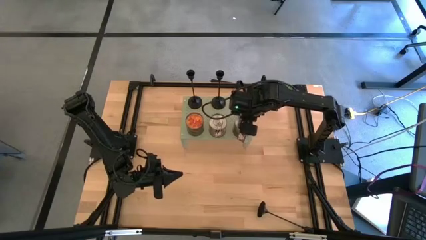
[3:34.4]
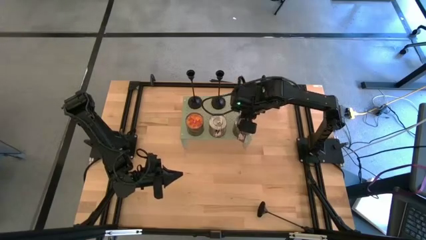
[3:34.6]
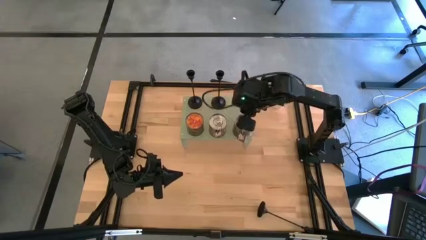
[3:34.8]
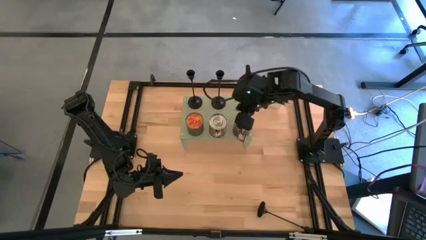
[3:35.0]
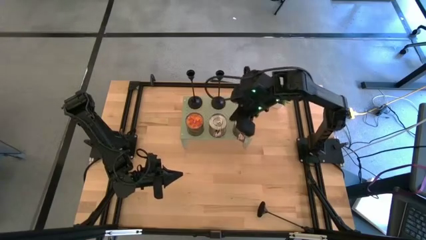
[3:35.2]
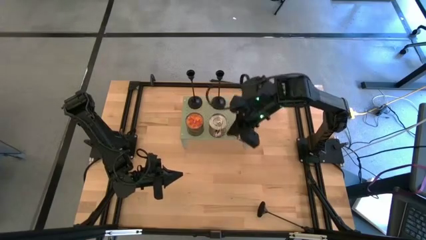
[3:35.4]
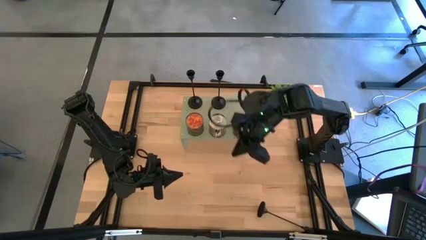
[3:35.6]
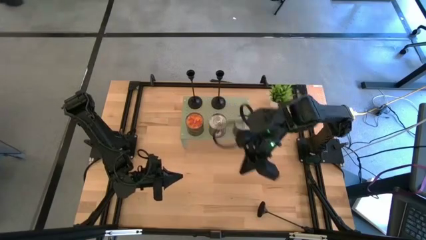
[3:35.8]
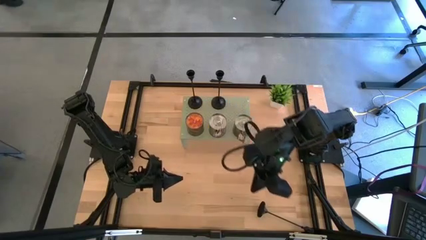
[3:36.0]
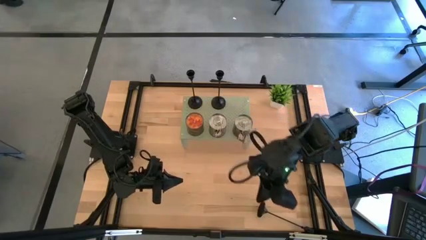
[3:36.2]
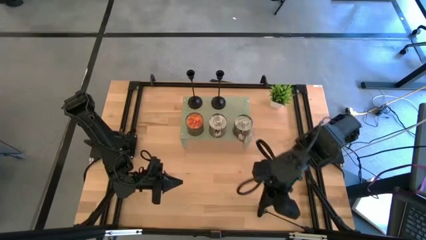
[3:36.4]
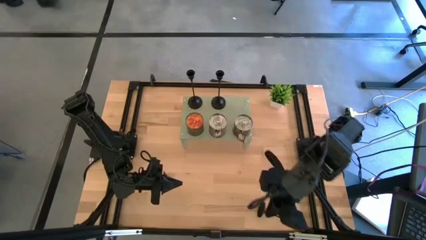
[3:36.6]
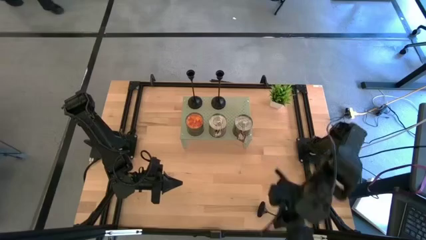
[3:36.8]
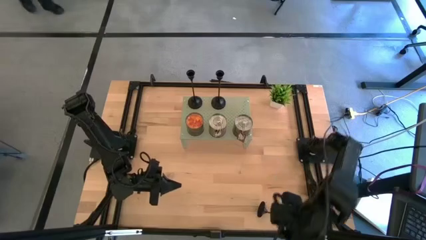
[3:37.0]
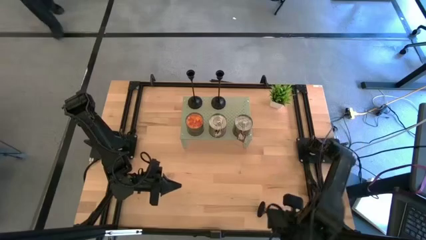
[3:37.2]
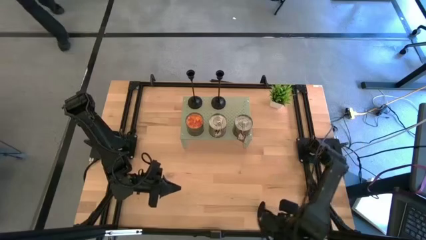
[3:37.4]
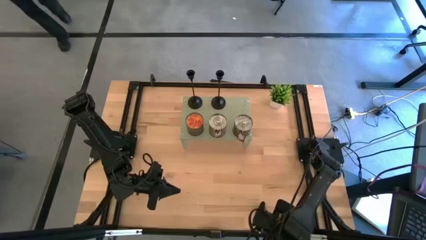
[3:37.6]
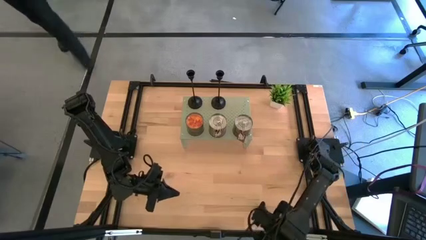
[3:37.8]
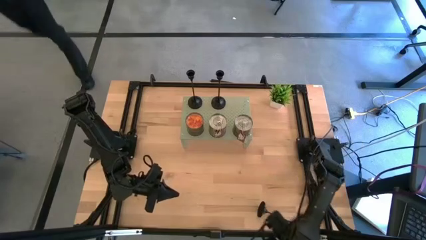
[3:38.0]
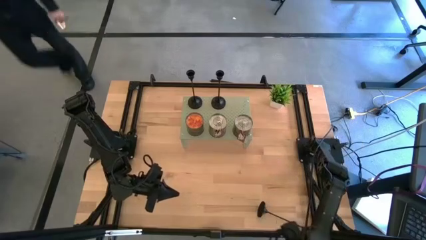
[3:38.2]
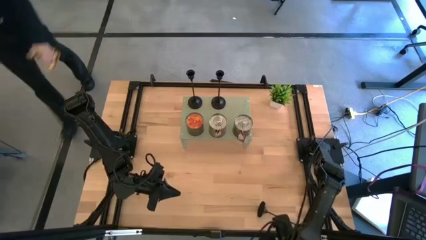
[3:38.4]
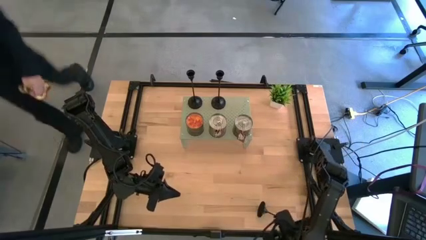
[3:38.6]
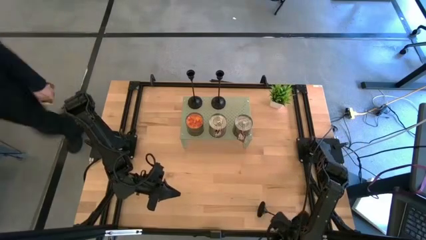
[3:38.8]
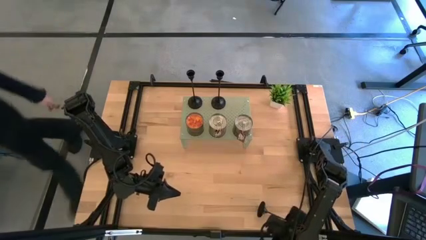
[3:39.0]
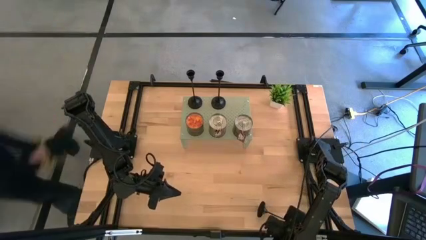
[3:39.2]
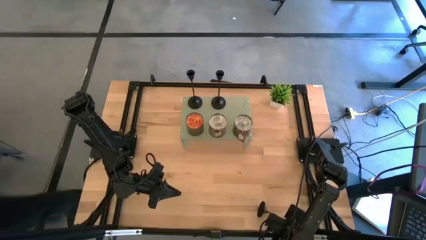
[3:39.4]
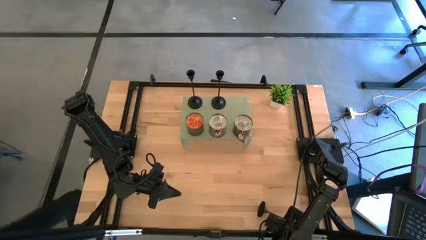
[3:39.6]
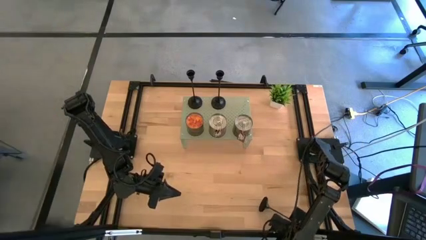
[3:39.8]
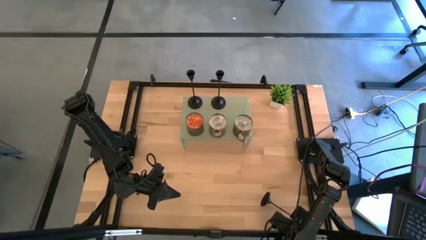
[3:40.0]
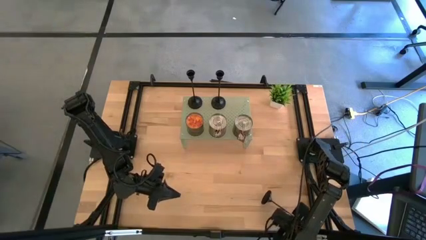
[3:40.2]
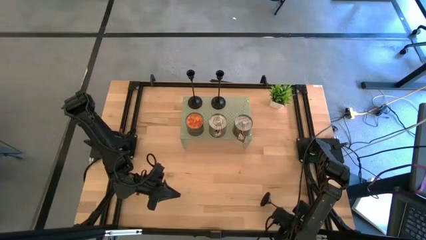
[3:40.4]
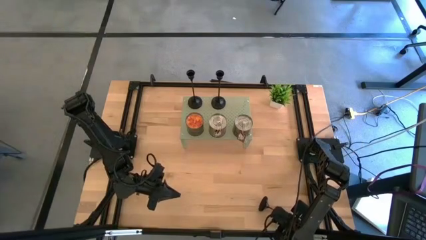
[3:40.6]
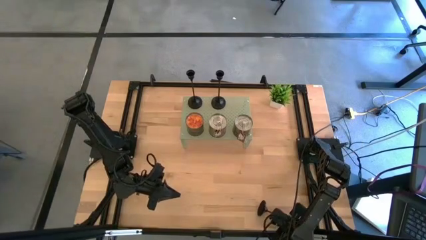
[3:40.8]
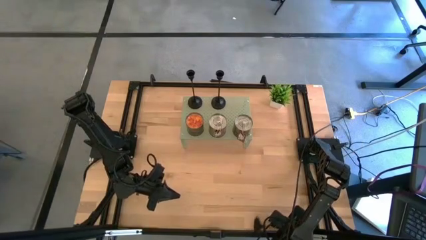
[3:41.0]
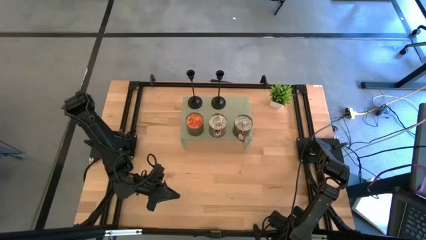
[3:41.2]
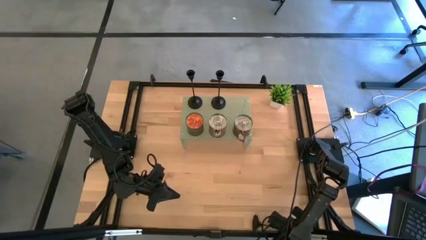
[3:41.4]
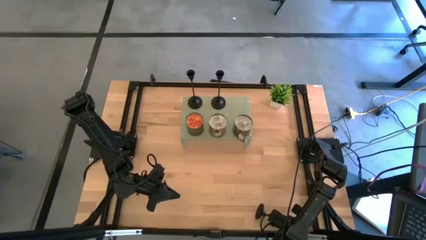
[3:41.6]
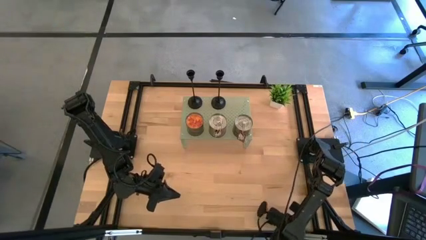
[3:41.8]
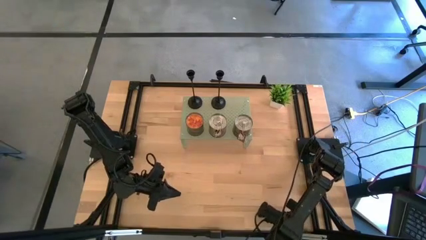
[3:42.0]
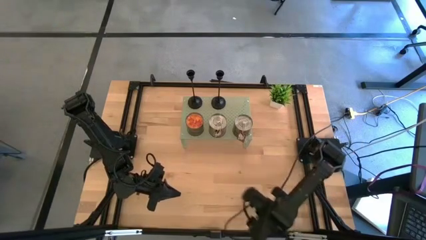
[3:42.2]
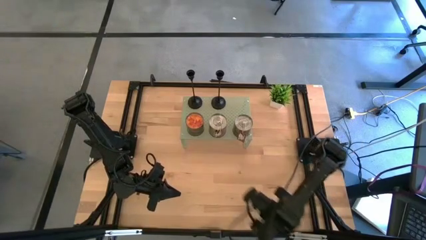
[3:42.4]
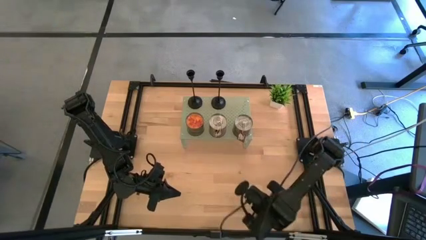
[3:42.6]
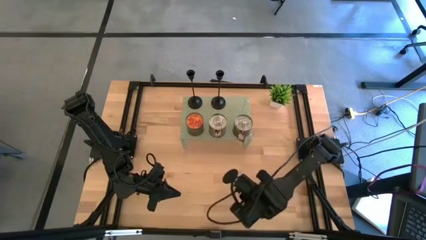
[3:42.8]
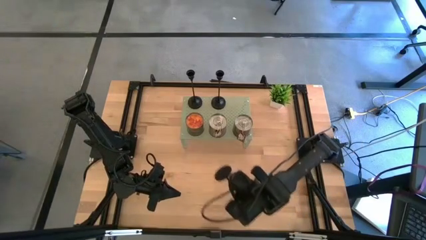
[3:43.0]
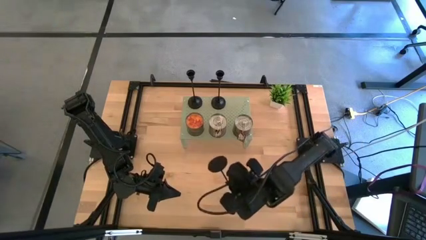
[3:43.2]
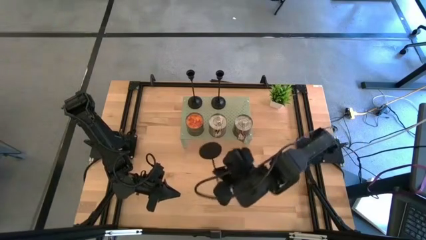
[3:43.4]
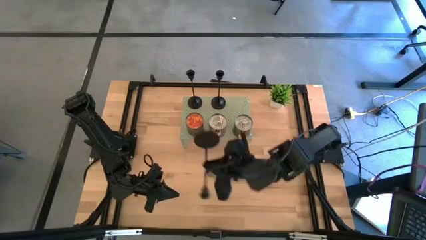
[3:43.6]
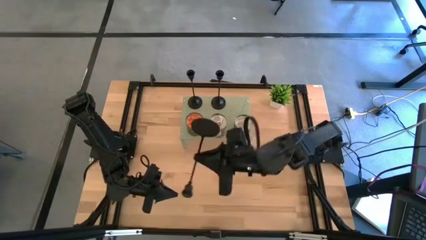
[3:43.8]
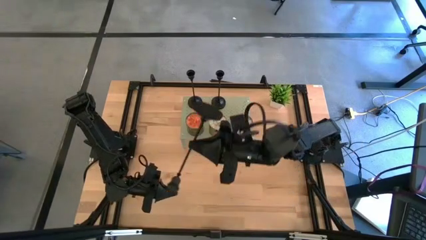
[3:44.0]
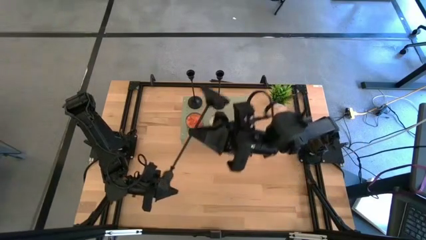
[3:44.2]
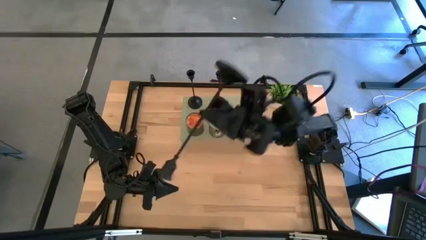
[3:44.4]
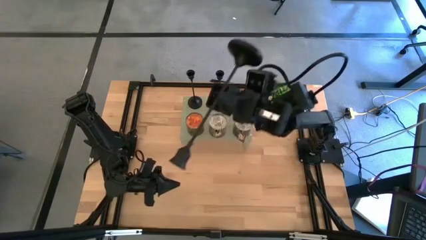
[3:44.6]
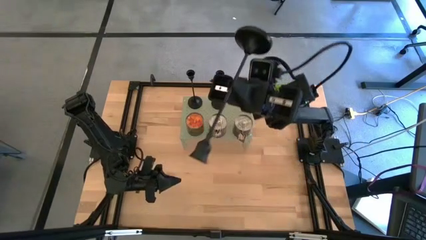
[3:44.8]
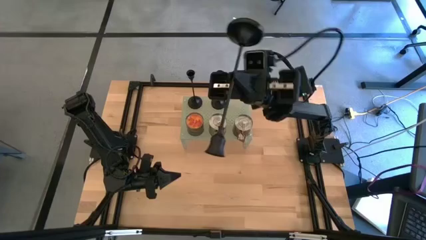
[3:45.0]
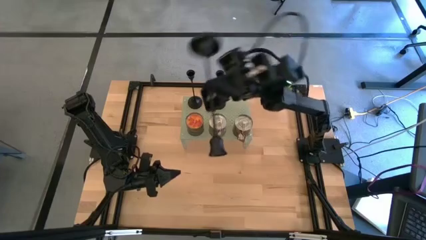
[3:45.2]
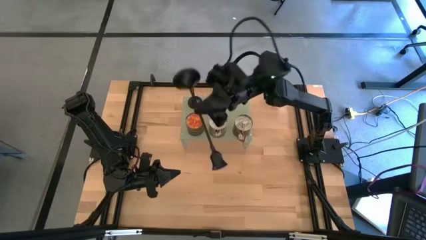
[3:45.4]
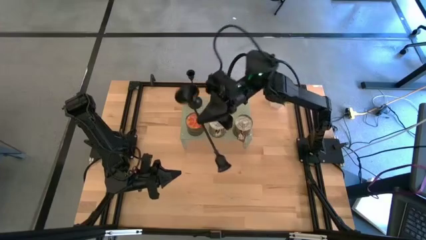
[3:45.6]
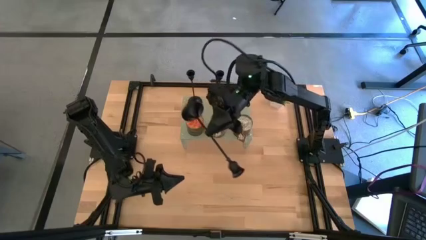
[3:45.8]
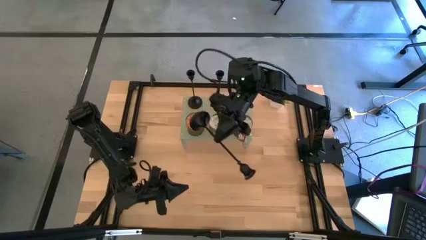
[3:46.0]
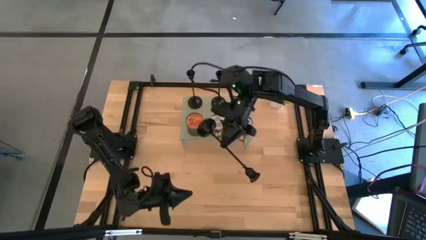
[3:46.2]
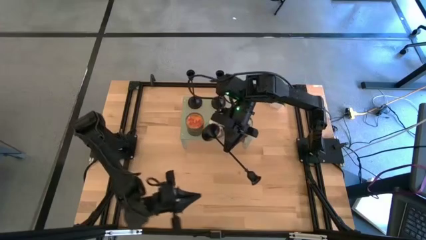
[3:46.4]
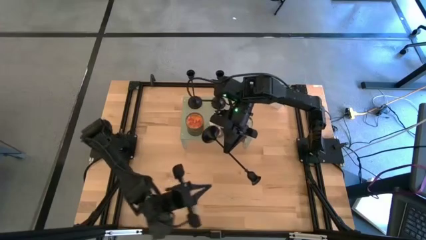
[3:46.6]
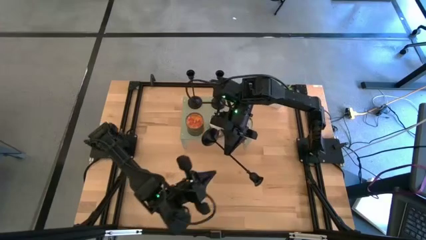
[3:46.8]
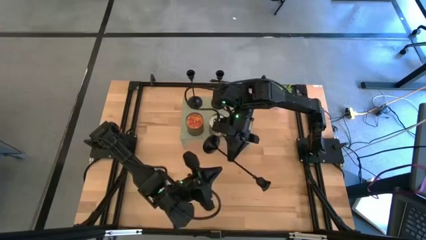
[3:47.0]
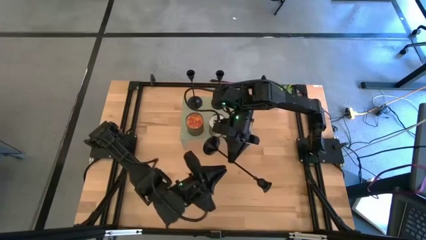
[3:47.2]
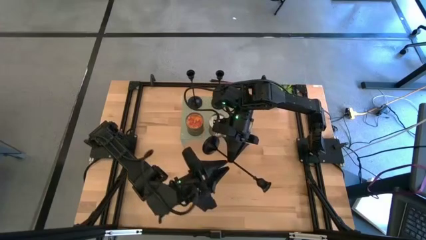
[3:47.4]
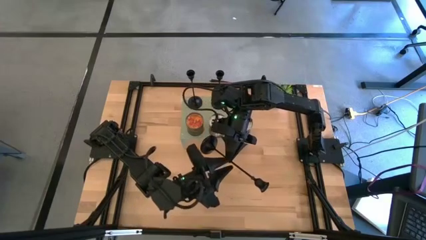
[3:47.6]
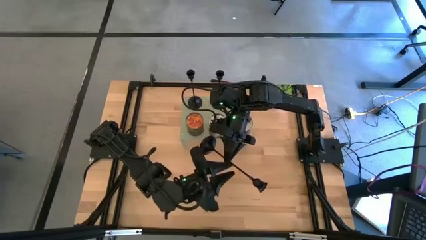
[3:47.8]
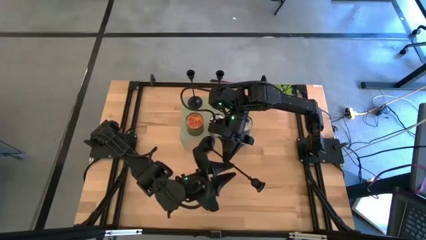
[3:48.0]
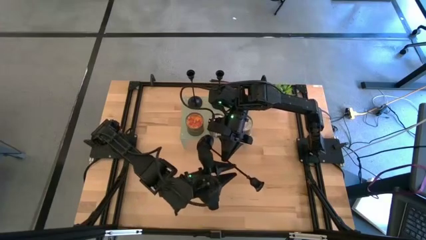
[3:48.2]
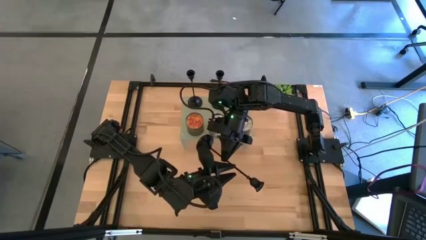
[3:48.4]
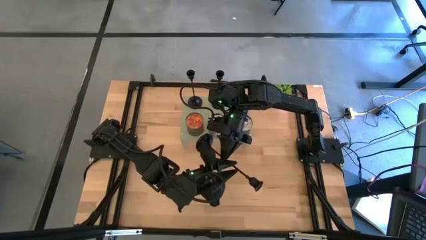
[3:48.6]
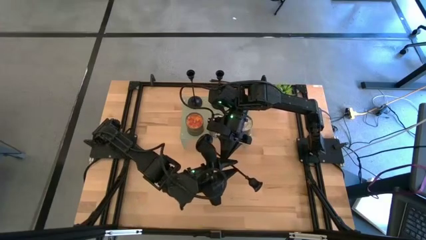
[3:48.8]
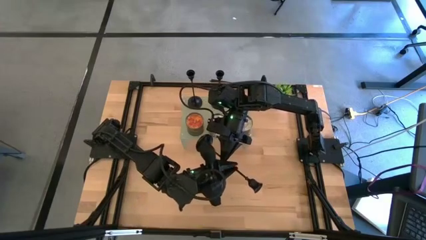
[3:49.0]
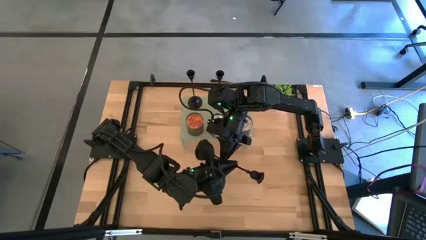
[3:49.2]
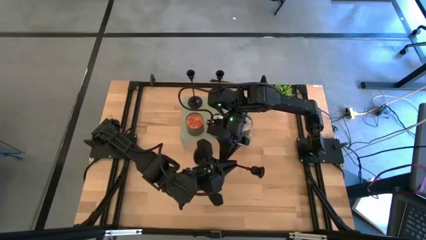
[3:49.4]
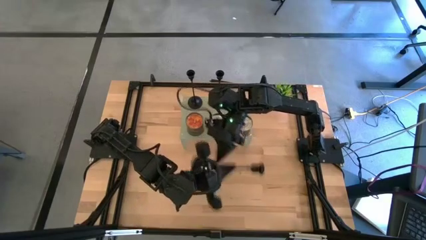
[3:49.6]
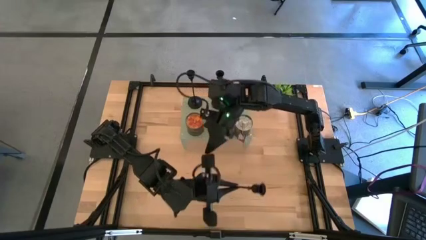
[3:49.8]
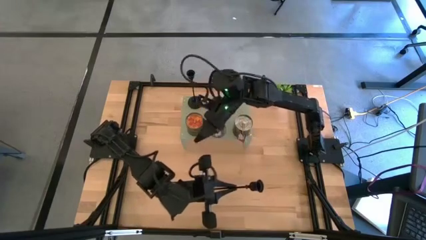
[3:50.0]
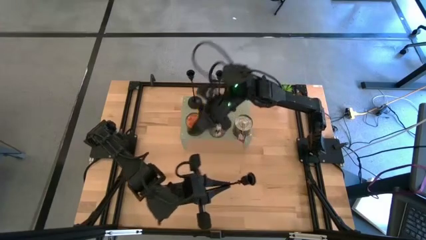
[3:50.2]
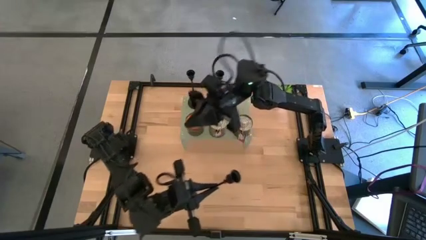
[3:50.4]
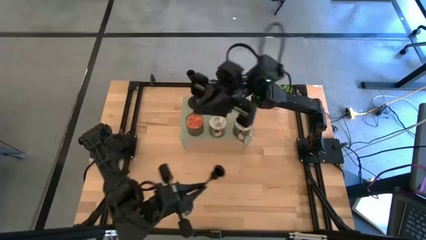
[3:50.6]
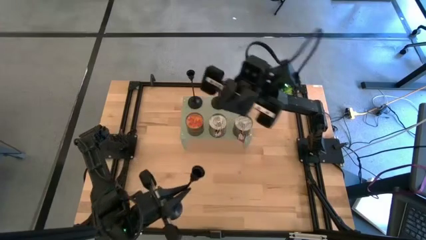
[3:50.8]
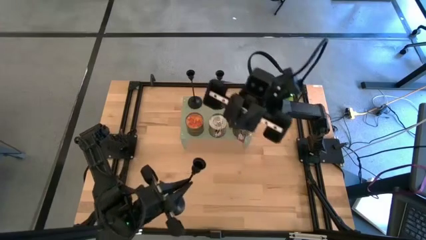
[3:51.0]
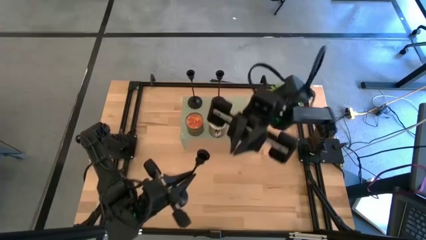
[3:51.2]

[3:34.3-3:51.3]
Task: Pick & Place candle stick holders
Put the candle holder on the shelf aligned with the other candle holder
